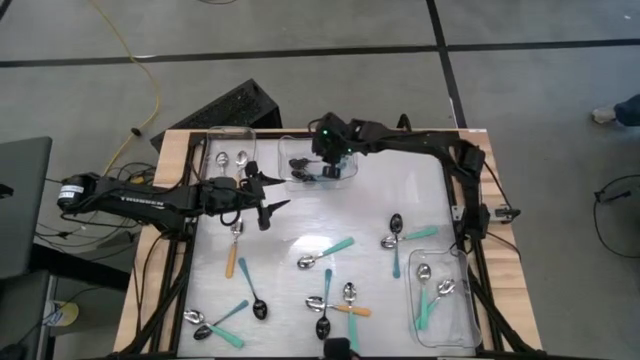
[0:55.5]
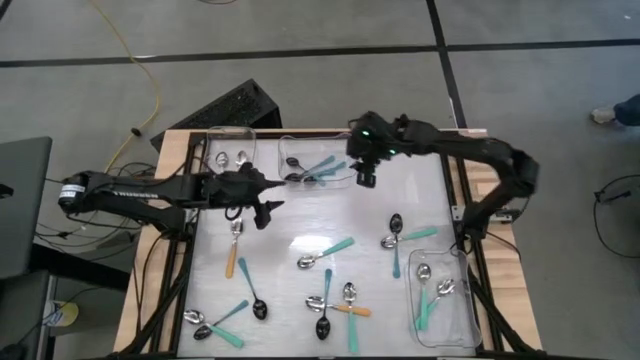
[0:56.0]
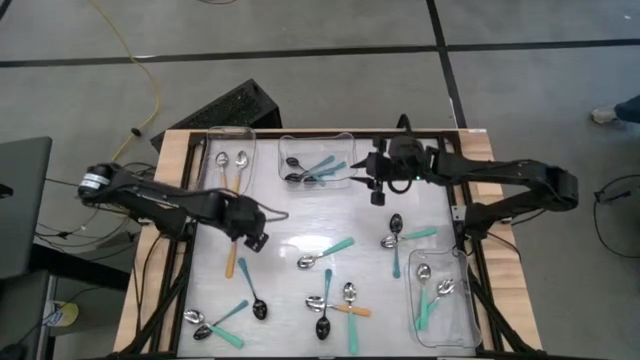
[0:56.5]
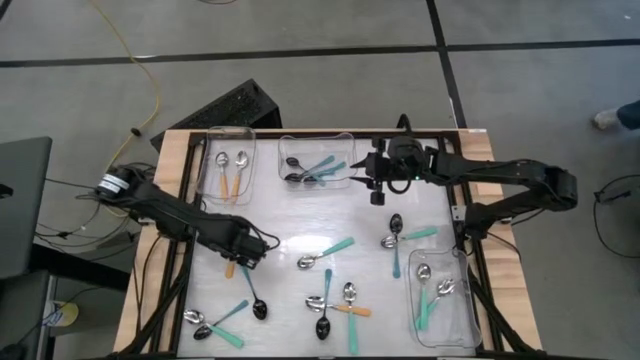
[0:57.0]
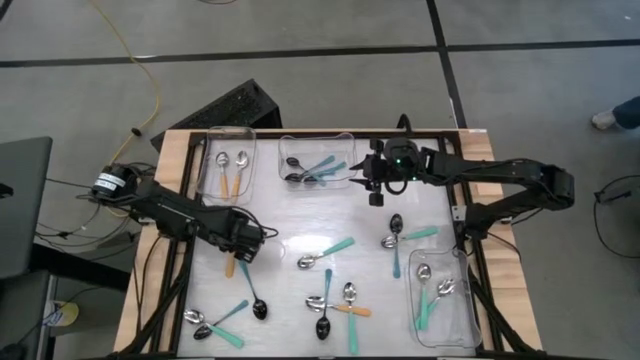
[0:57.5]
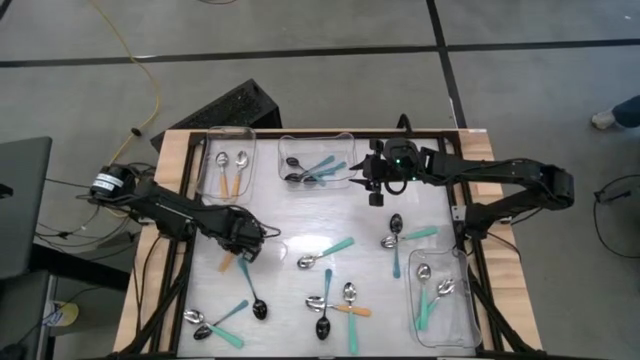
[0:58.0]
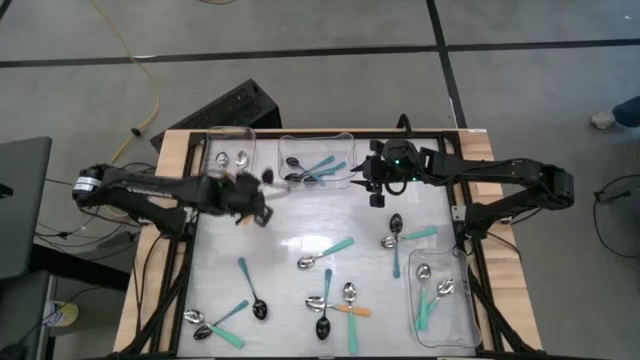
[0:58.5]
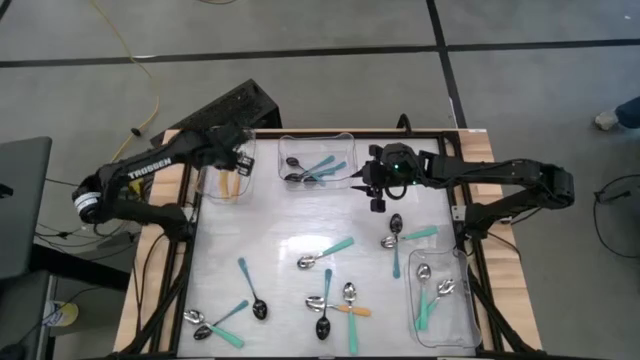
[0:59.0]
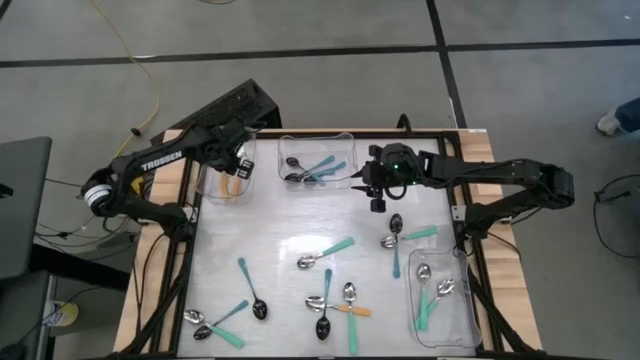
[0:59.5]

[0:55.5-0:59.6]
Task: Sort silverware by color (type)
Put the yellow spoon into the top left transparent bin

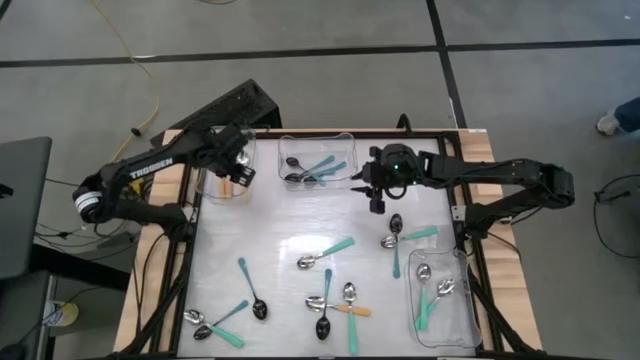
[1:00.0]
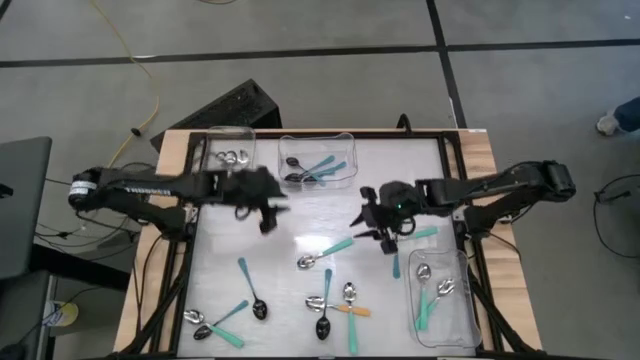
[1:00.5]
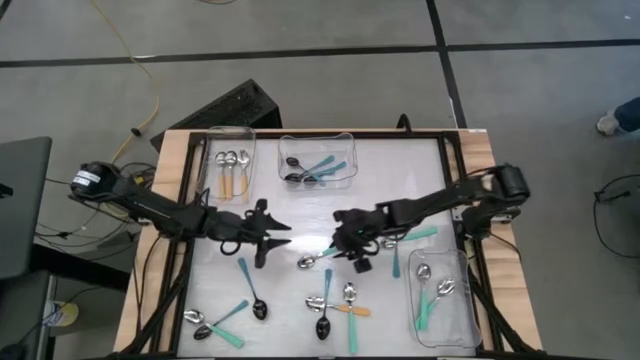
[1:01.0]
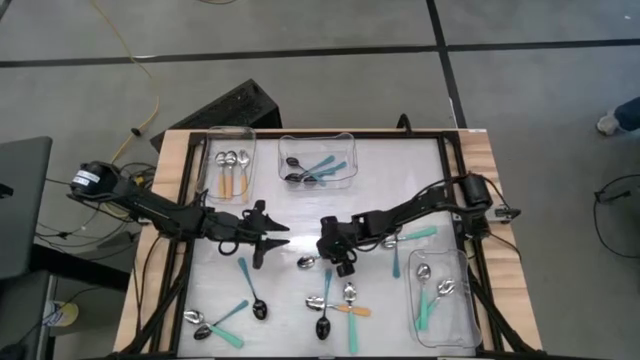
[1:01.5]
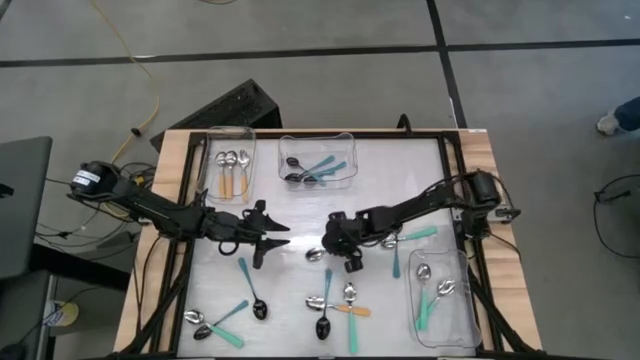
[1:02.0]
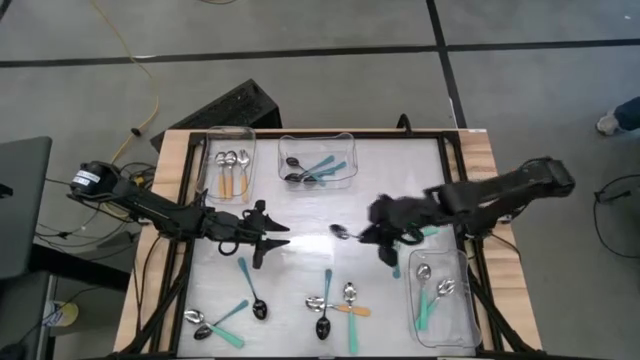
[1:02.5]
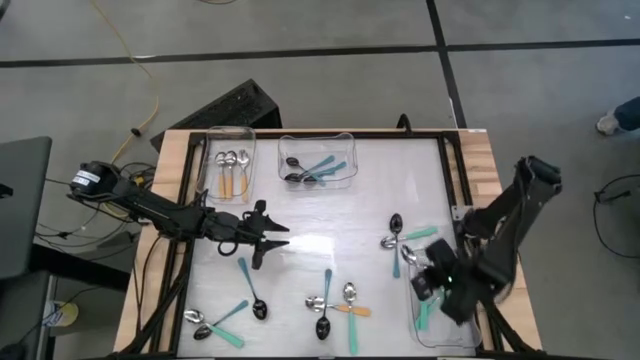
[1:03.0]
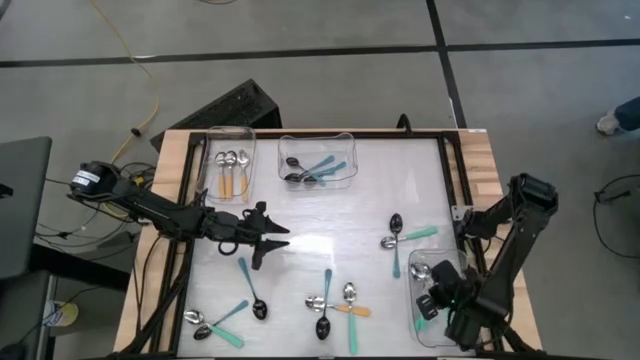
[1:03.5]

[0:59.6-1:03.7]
Put the green spoon into the bottom transparent bin

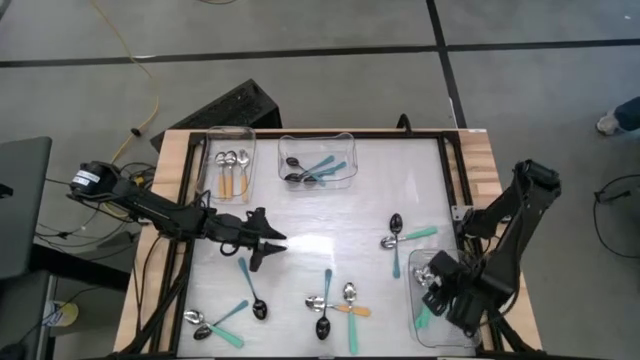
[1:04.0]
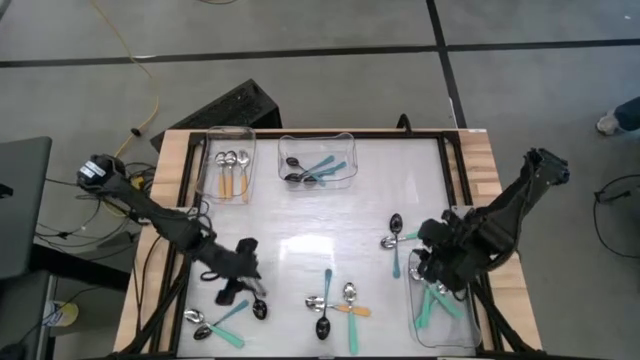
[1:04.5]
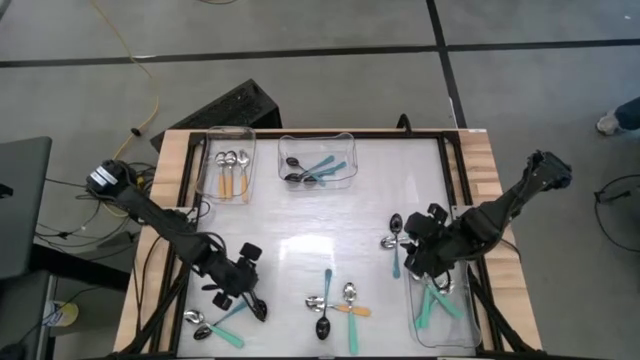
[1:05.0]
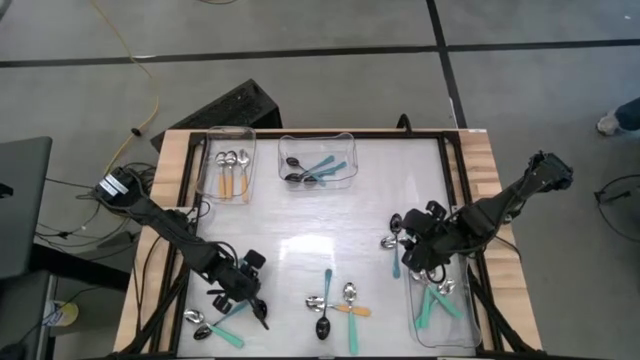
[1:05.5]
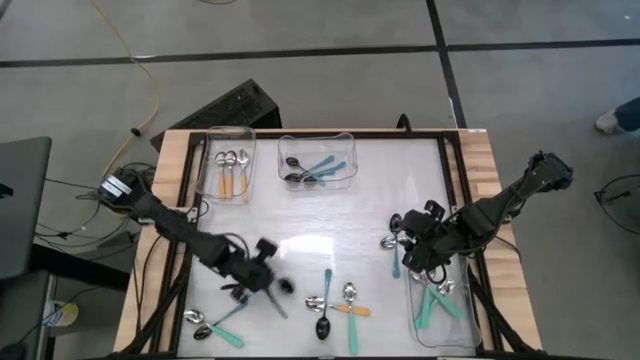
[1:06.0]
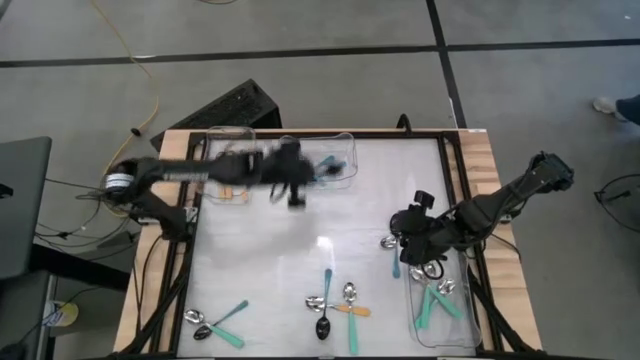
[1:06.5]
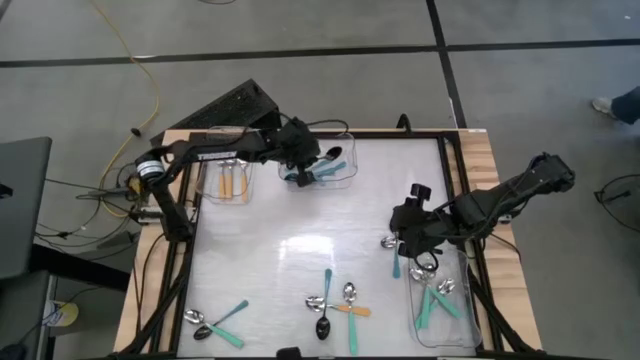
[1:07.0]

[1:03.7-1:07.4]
Put the blue spoon into the top middle transparent bin

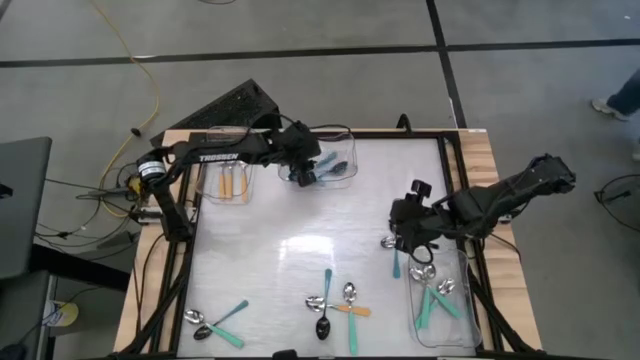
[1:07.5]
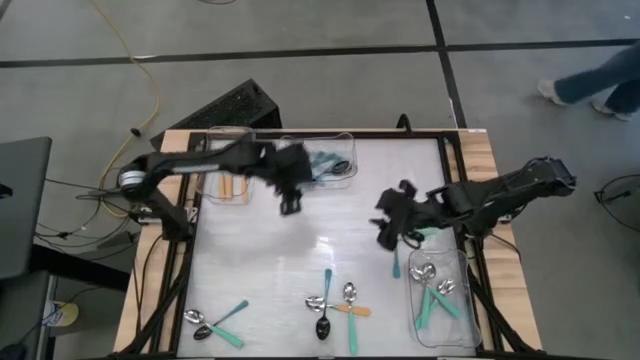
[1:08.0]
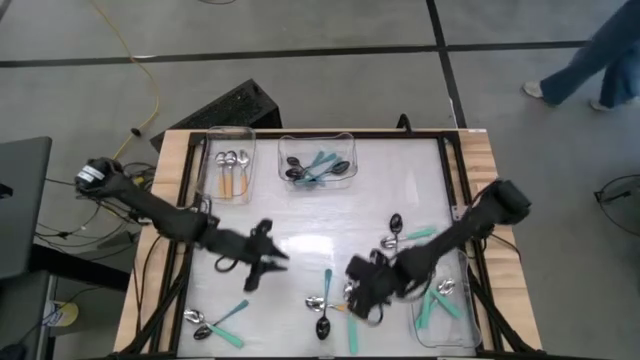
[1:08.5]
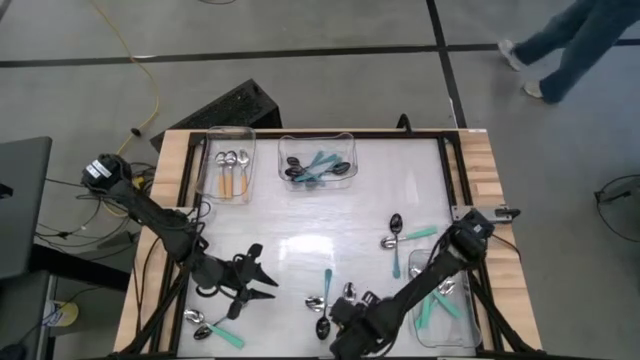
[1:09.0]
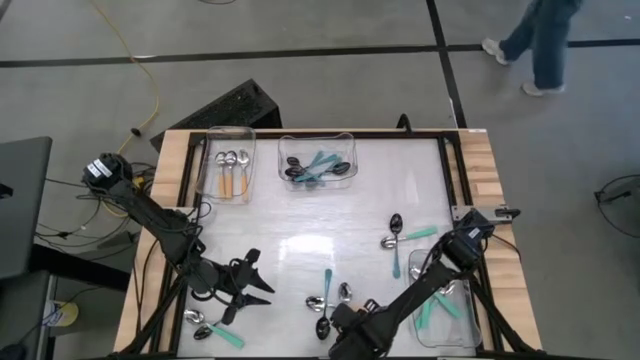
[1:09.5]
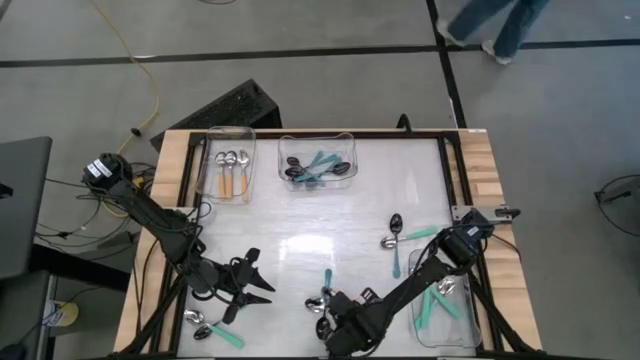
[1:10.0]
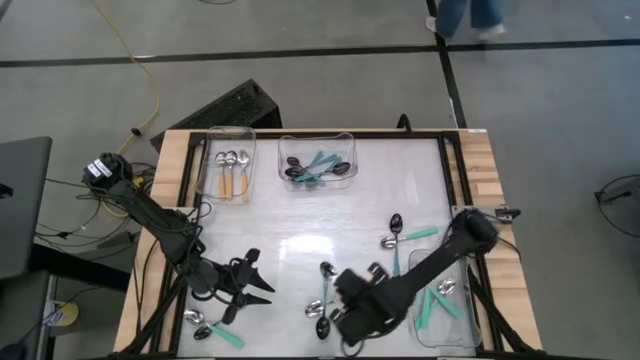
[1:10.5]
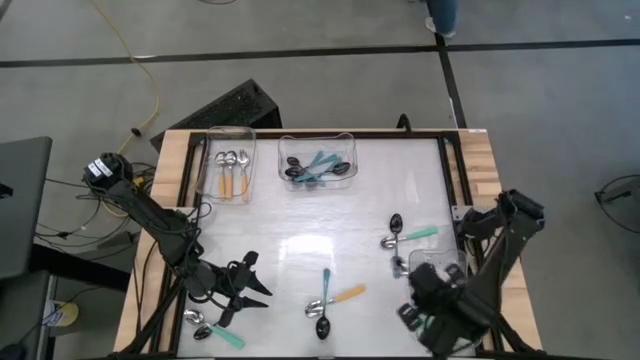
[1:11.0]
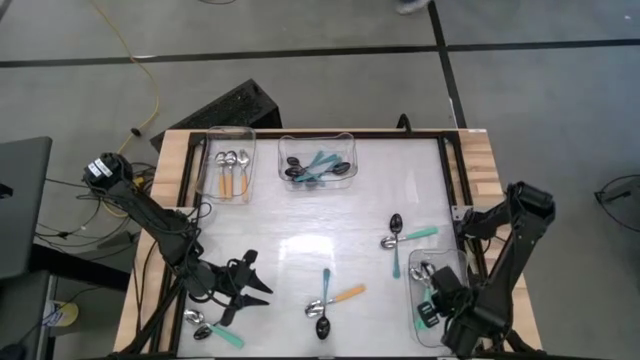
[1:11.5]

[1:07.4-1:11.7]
Put the green spoon into the bottom transparent bin

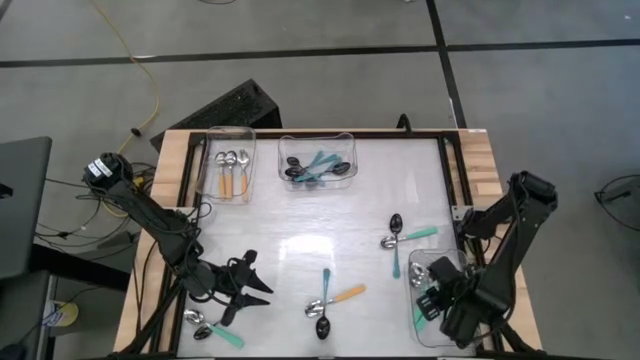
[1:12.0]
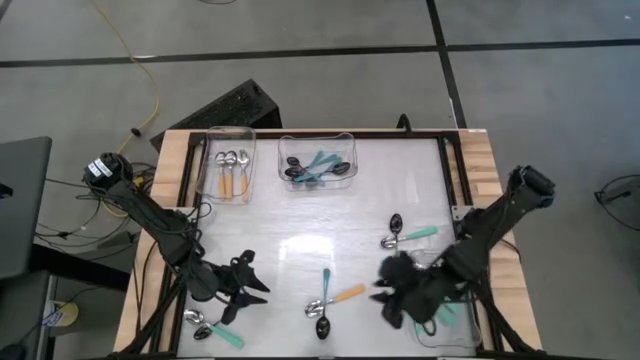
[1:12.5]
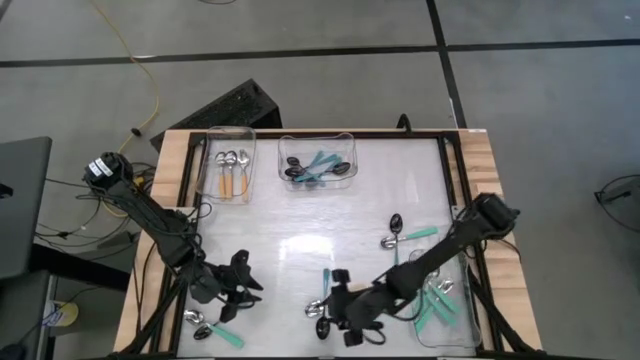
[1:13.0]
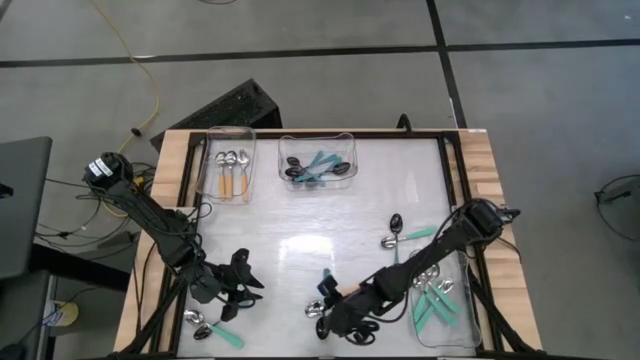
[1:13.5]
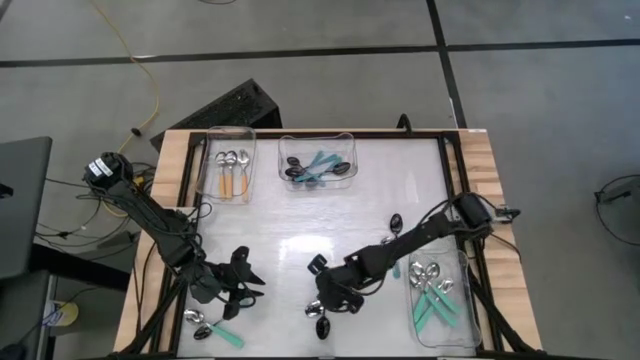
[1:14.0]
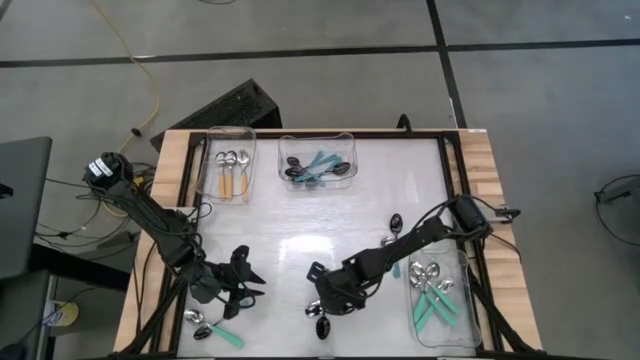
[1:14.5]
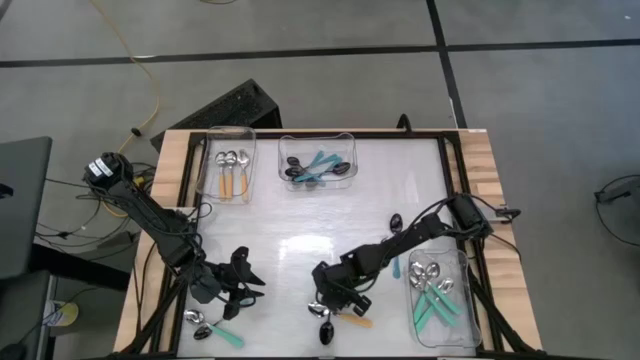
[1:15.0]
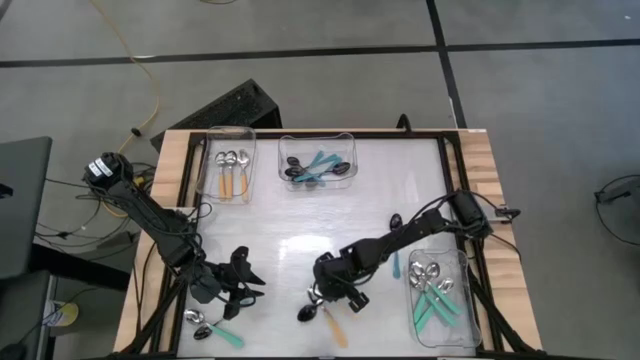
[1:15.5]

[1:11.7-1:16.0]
Put the blue spoon into the top middle transparent bin

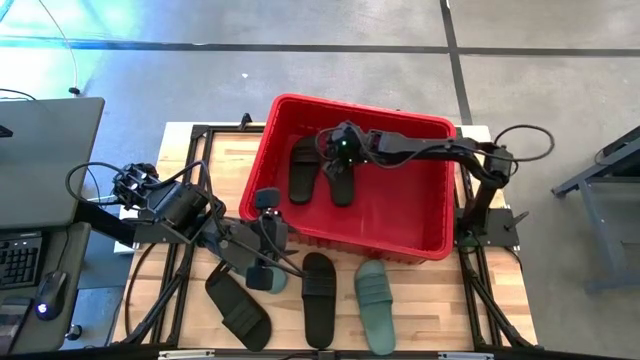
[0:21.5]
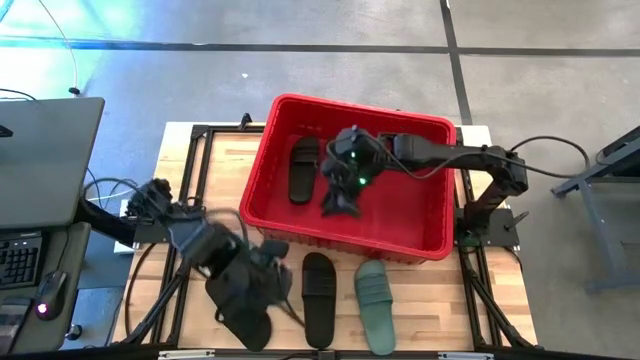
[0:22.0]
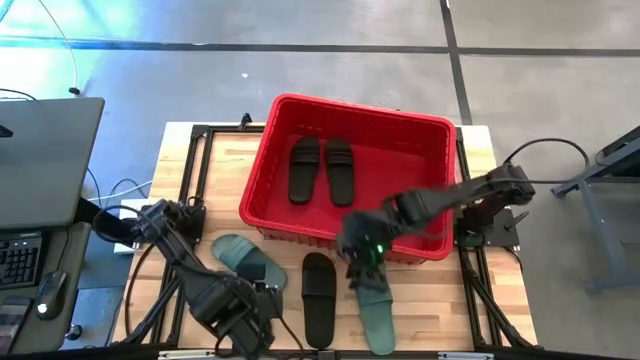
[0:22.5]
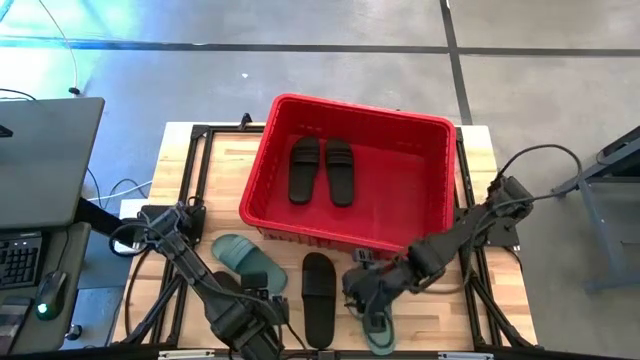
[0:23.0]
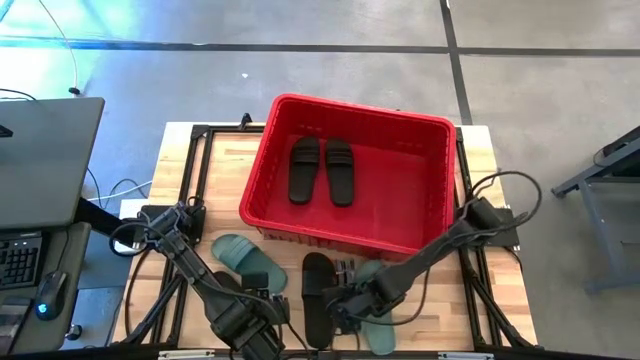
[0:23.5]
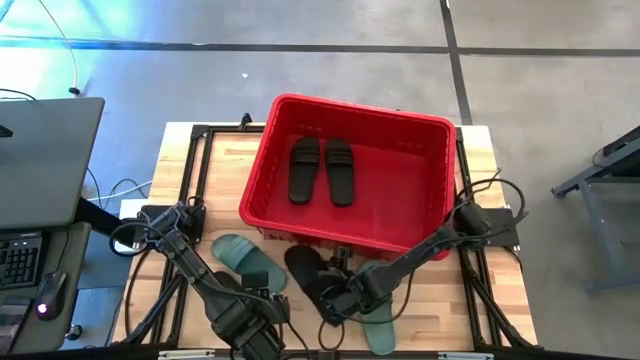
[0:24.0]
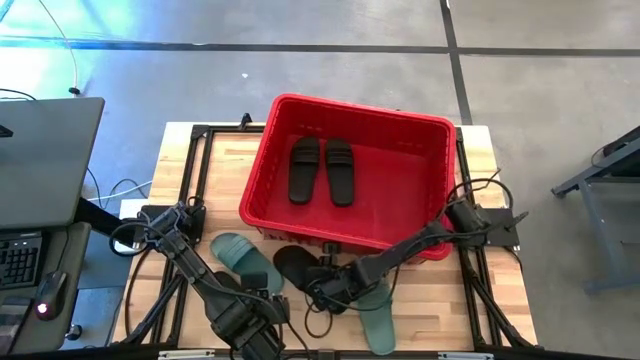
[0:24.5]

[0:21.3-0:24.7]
Task: Pick and place slides into bin
Put the black slide into the red bin
